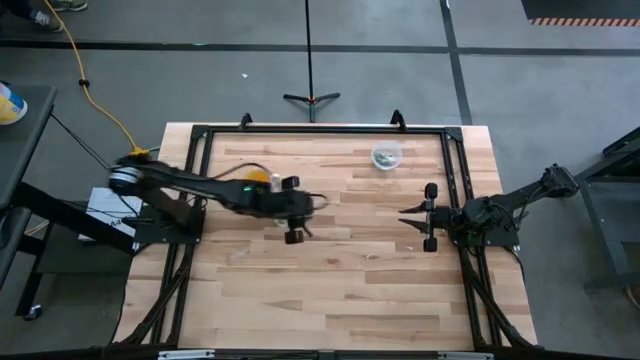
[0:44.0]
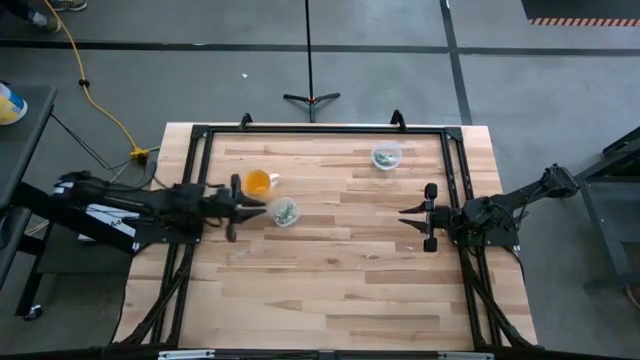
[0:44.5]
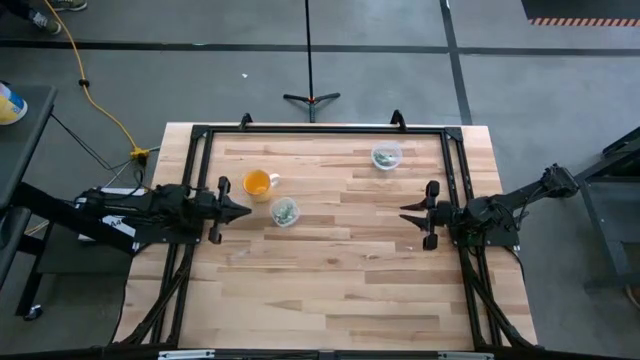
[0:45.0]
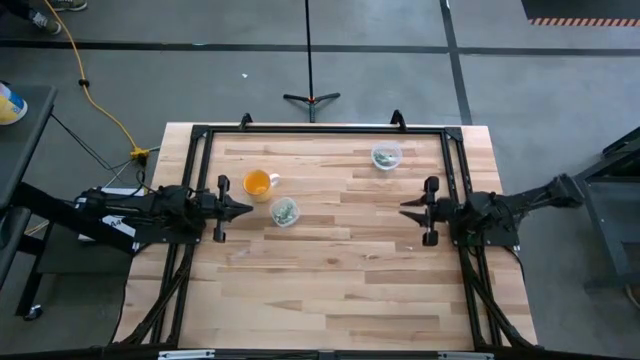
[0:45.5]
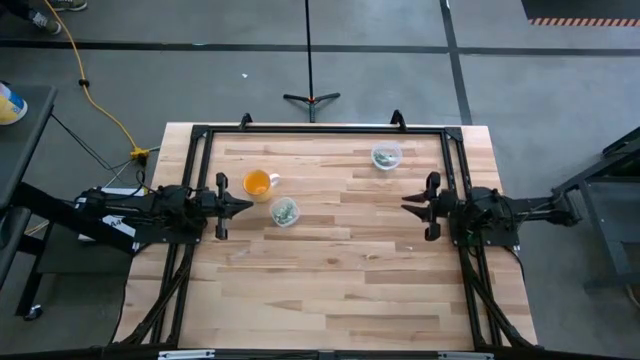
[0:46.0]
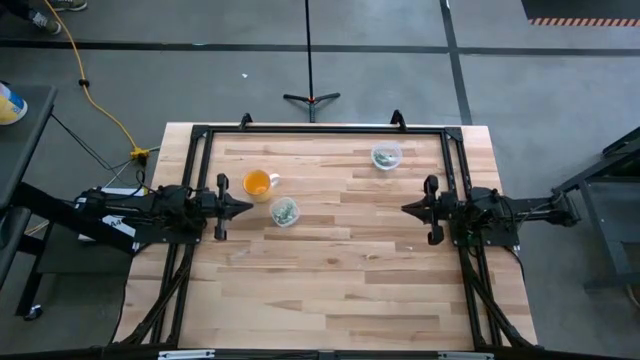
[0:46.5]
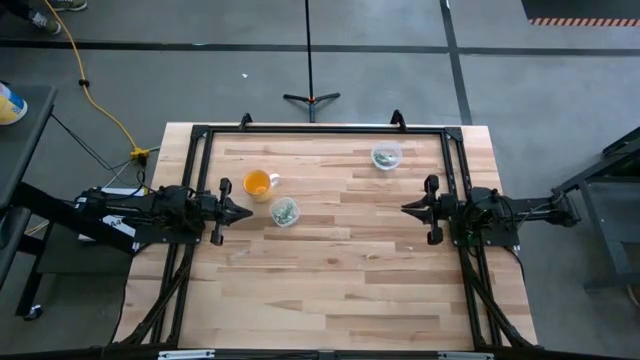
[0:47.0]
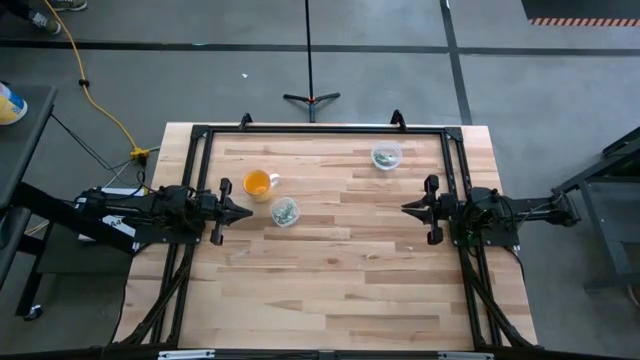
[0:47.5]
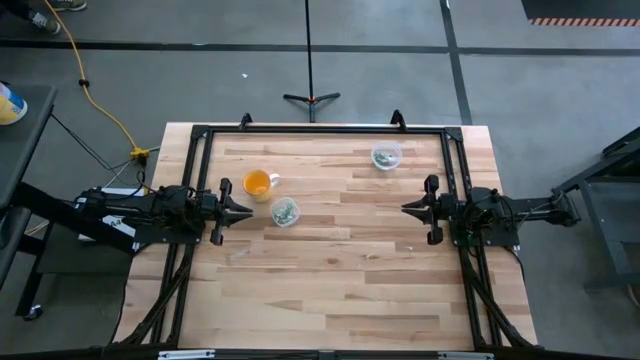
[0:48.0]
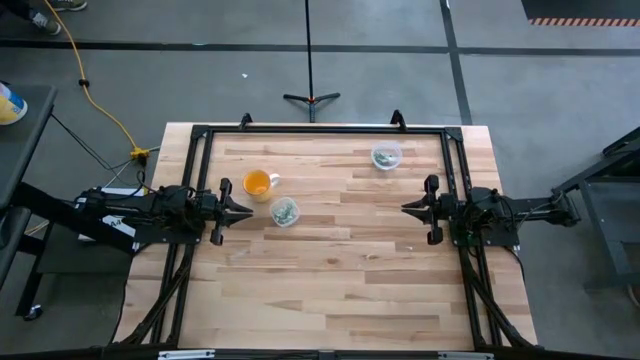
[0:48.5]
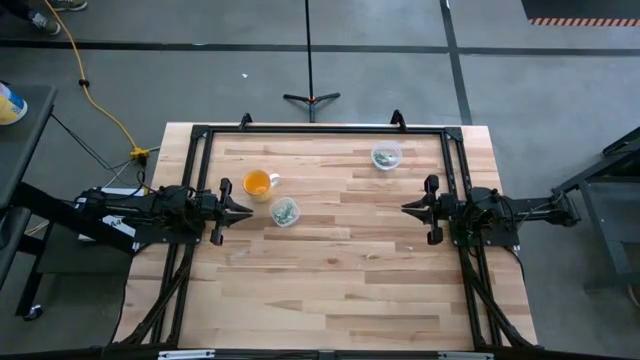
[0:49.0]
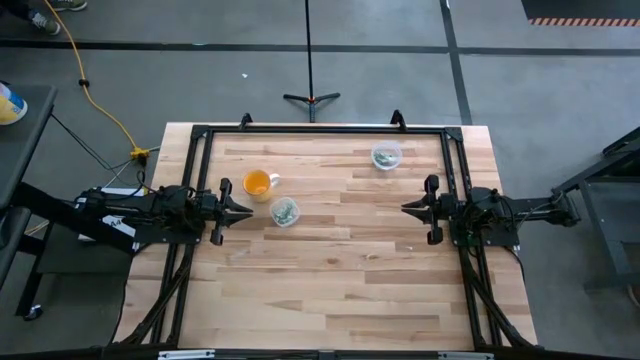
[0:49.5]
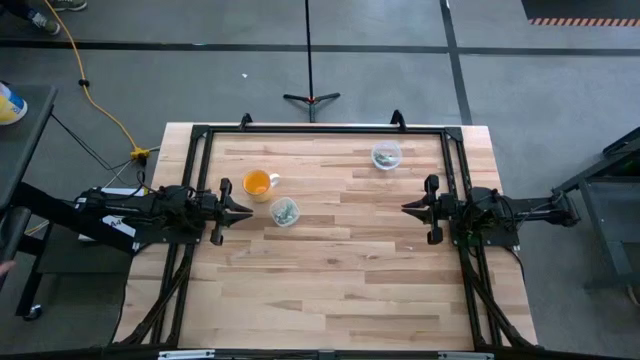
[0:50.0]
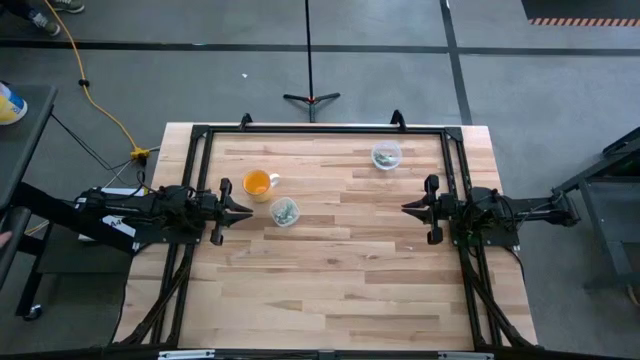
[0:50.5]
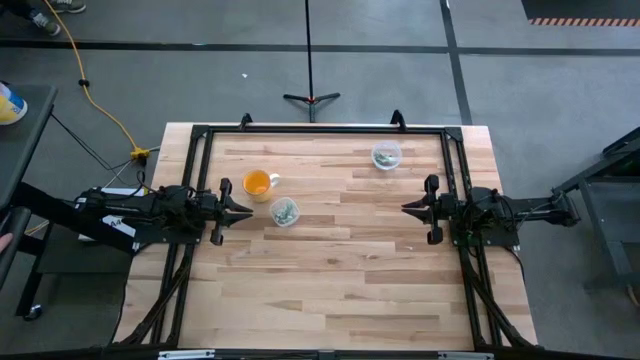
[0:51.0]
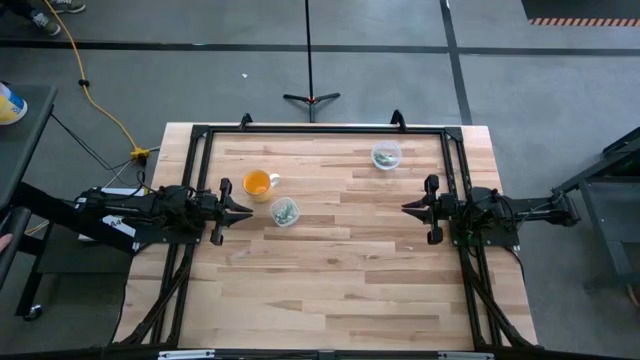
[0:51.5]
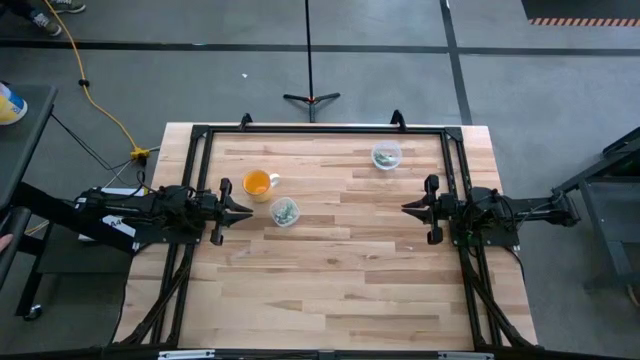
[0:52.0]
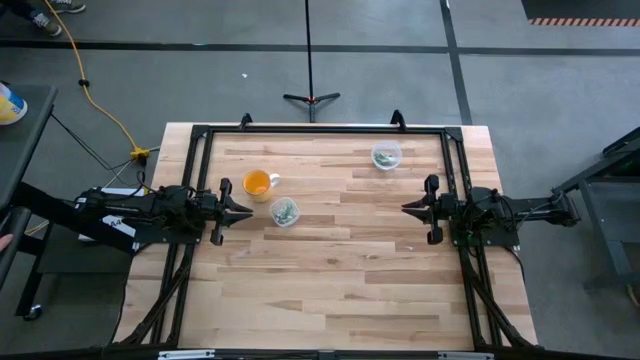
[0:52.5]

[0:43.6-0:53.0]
Task: Pick and place Stevia / Truvia into bins
Return to Home Position

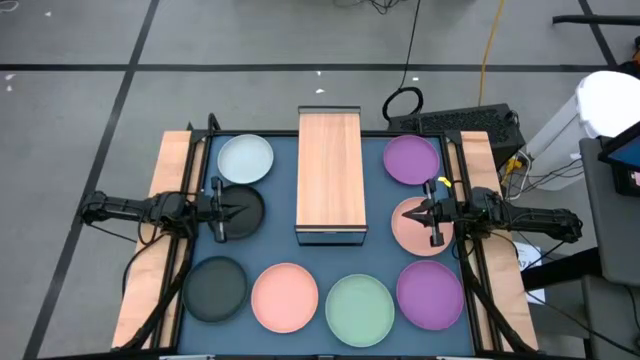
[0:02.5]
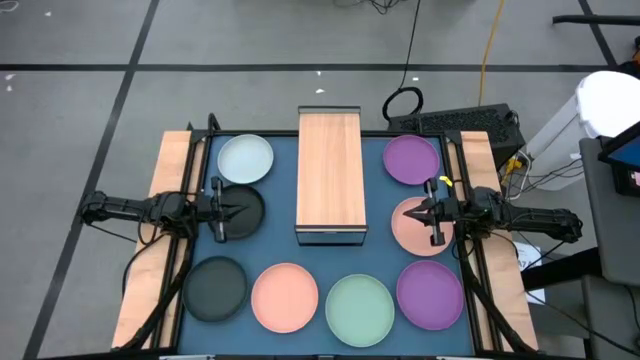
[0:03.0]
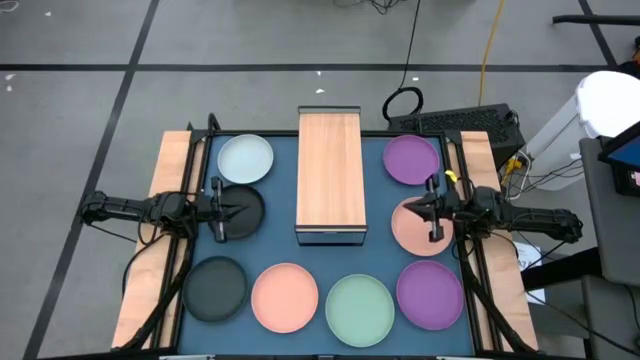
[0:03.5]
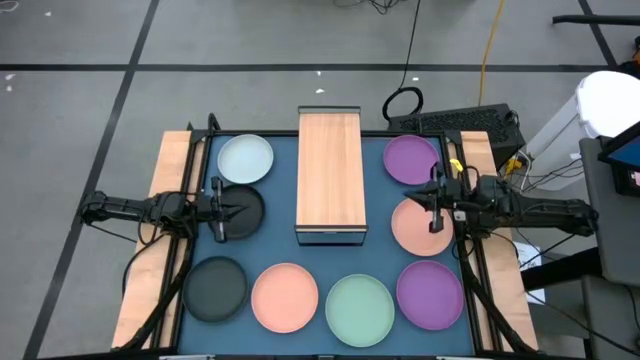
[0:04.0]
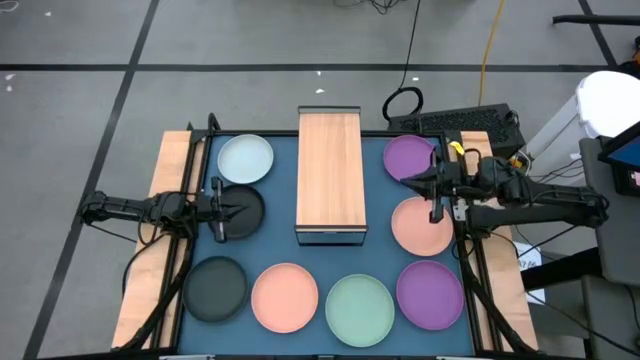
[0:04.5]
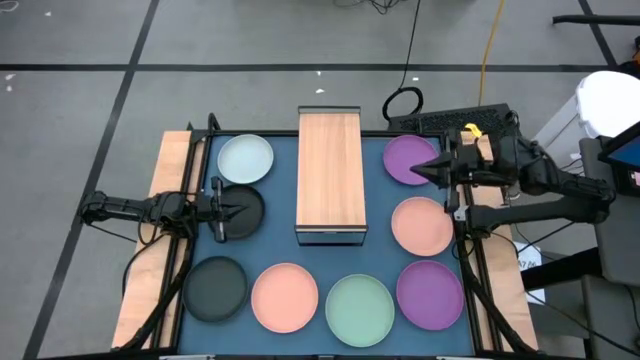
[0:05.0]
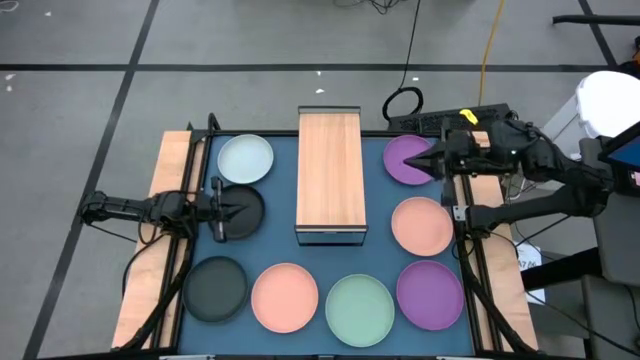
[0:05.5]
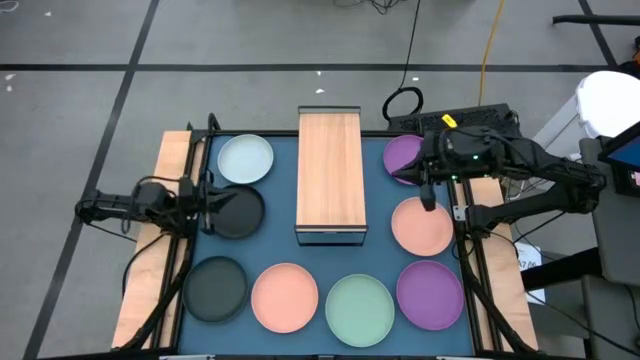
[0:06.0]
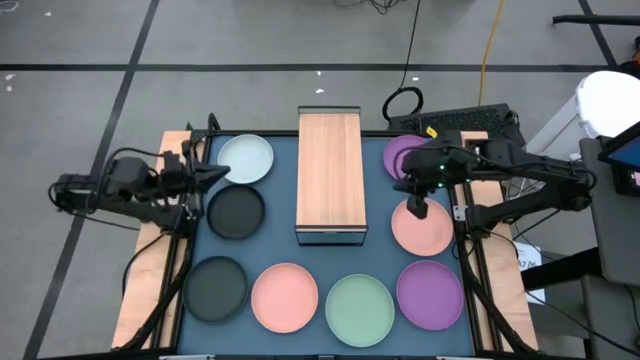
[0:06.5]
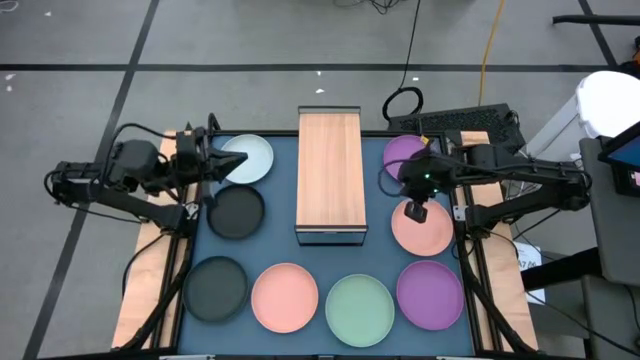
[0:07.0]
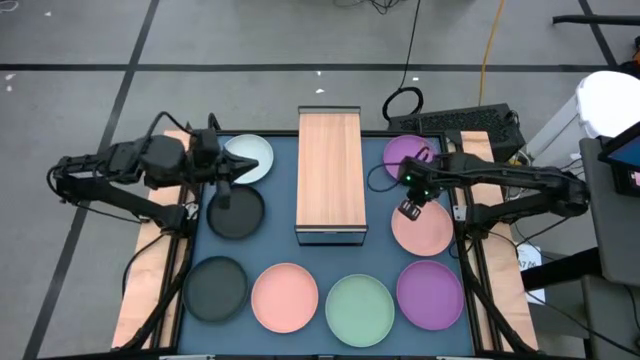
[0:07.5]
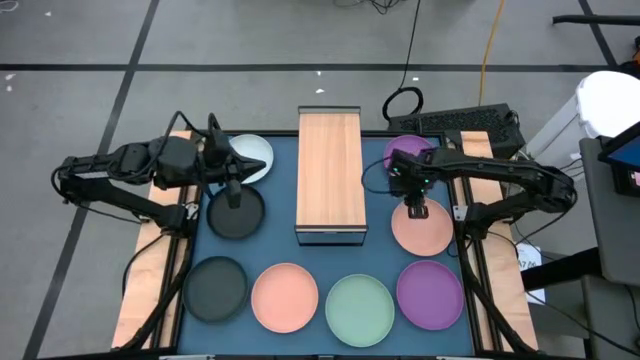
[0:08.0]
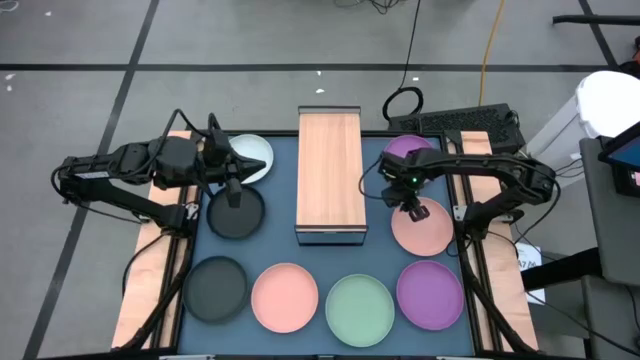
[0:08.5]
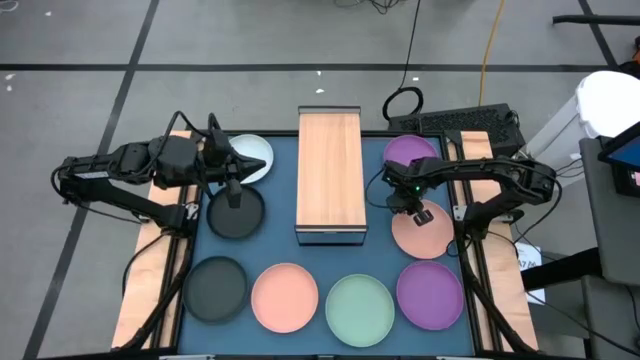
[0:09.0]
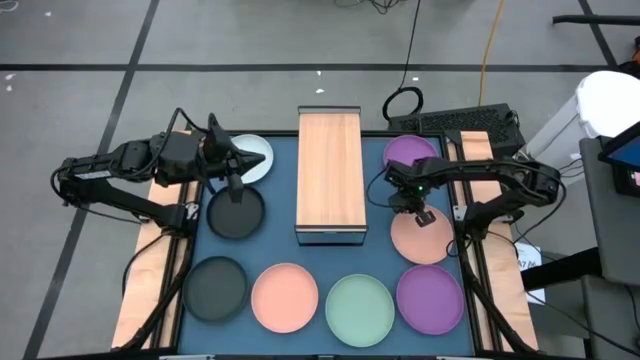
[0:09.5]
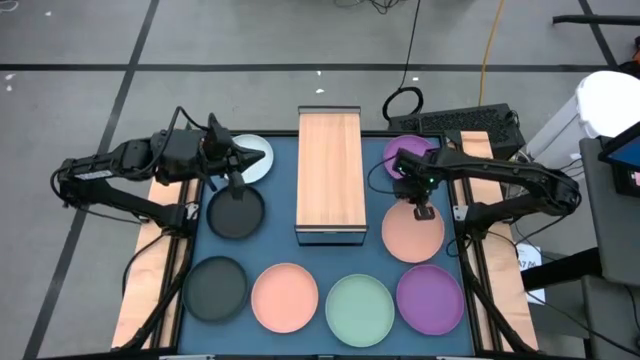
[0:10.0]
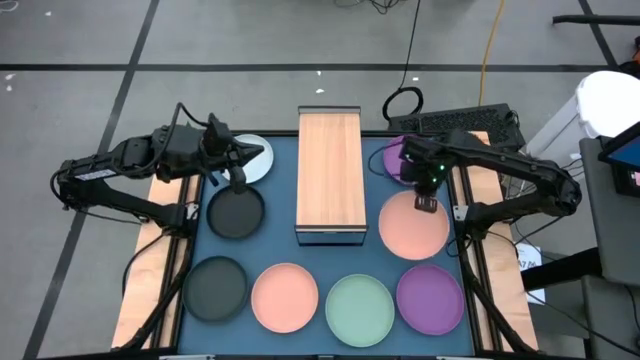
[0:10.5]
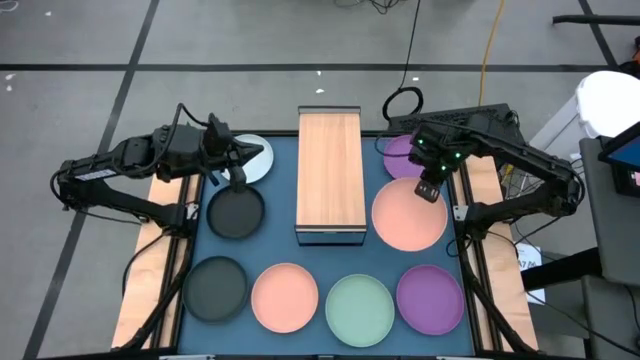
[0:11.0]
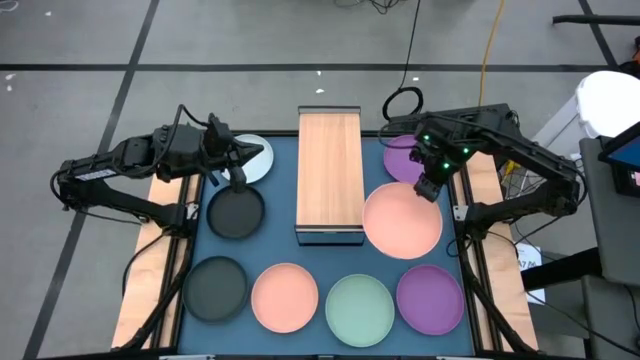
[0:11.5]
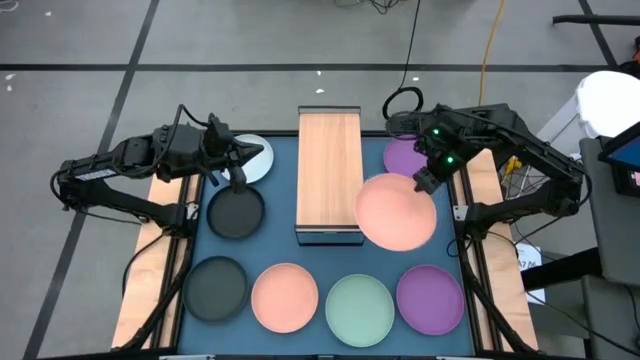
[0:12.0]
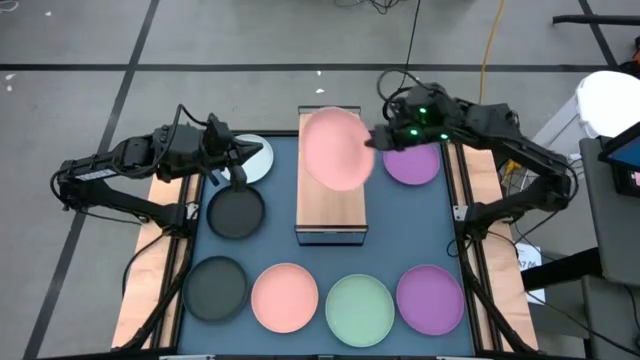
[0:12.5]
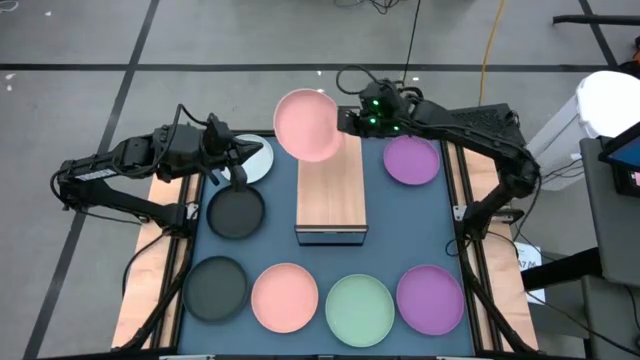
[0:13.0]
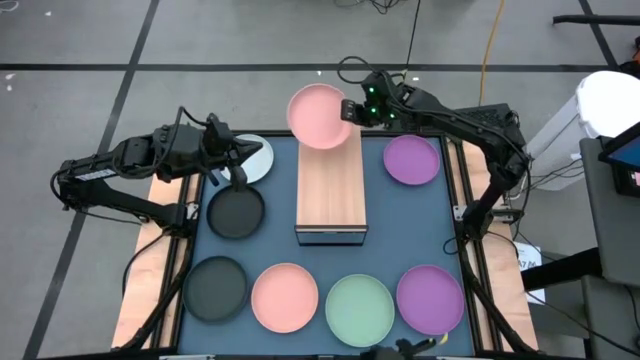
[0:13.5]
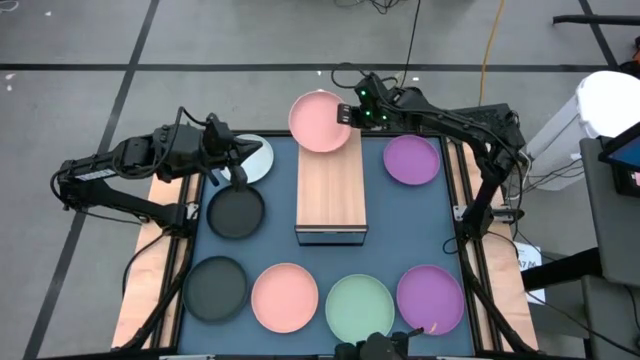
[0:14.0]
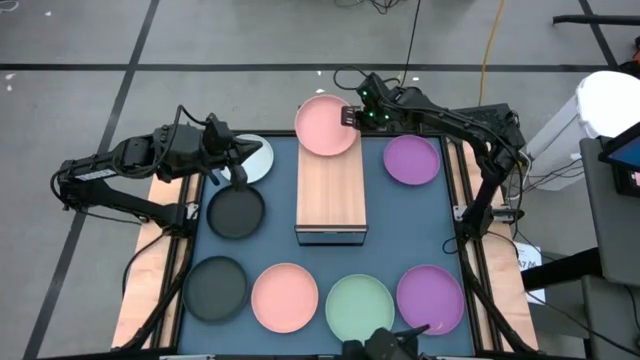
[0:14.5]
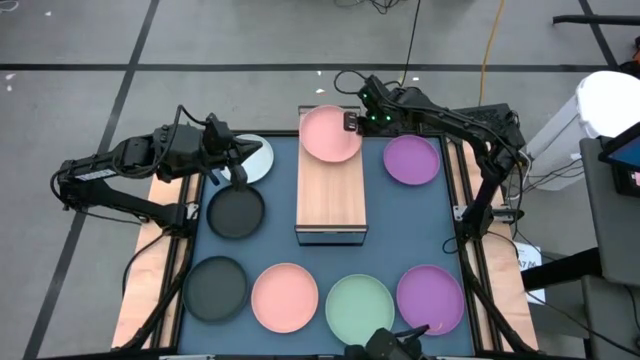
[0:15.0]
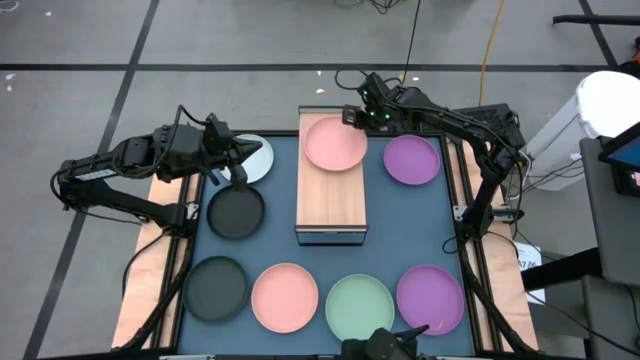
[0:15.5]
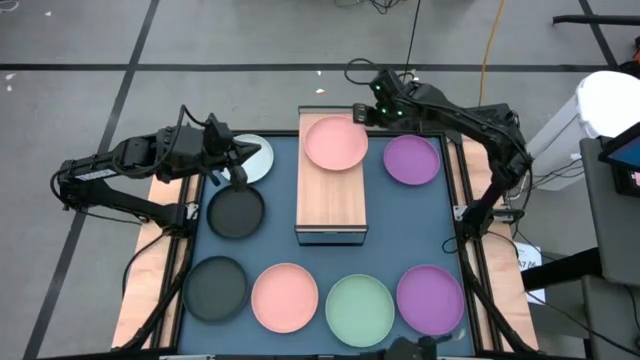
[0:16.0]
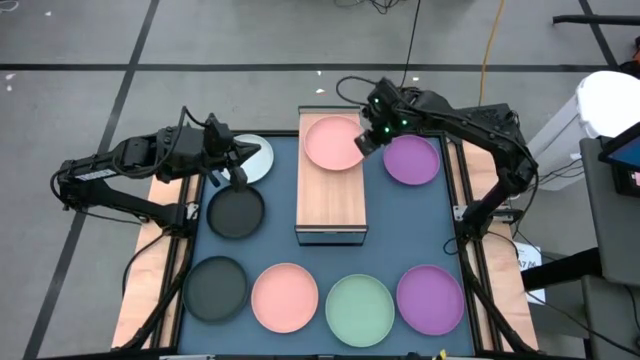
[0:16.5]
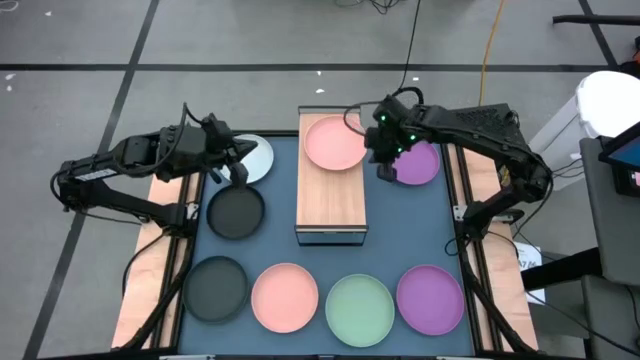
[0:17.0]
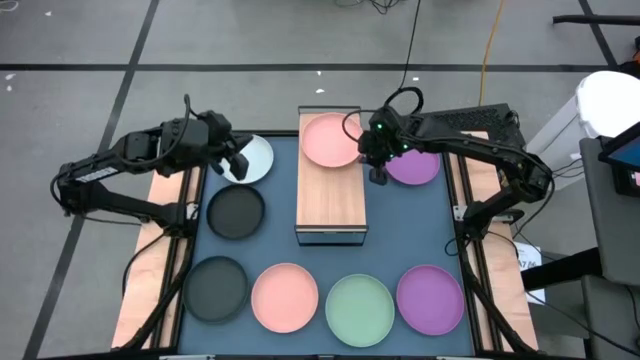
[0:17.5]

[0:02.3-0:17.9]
Task: Place and stack plates onto a shelf
Put the top orange plate on the shelf
